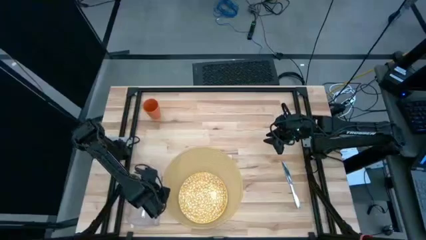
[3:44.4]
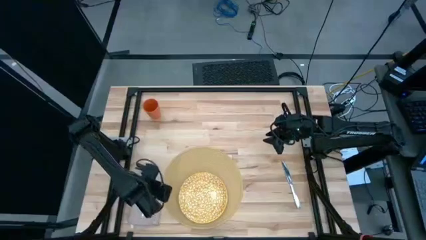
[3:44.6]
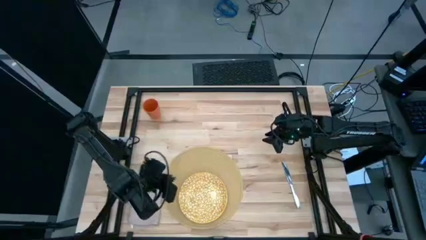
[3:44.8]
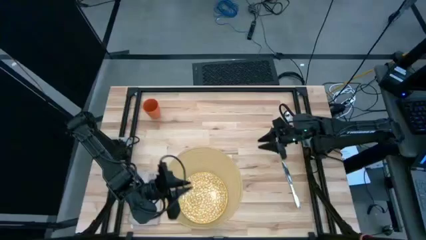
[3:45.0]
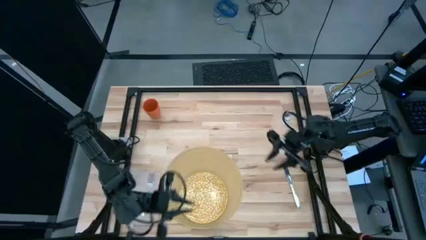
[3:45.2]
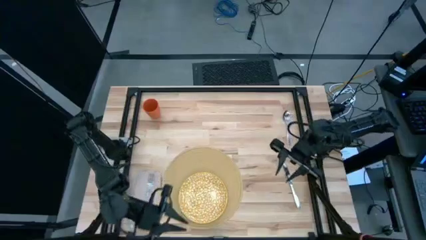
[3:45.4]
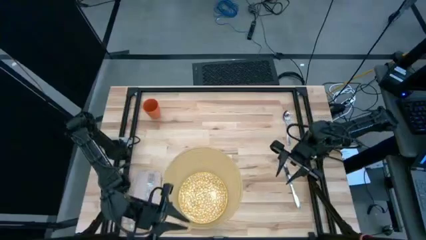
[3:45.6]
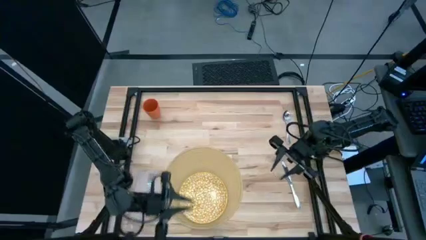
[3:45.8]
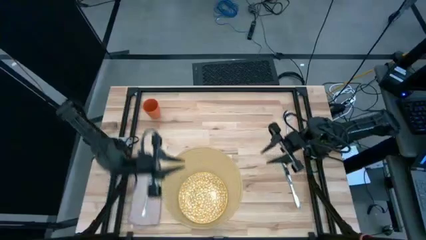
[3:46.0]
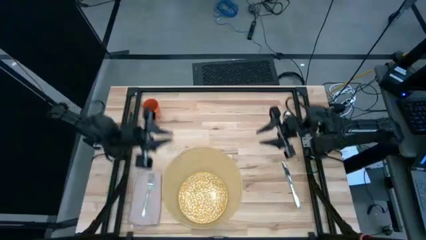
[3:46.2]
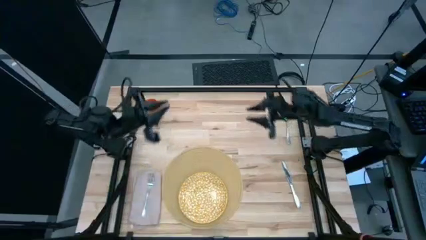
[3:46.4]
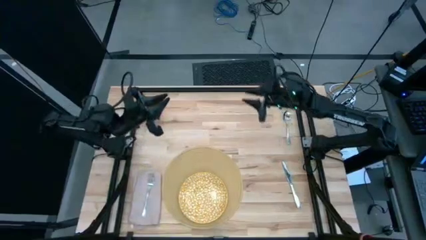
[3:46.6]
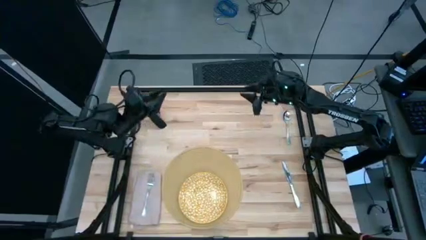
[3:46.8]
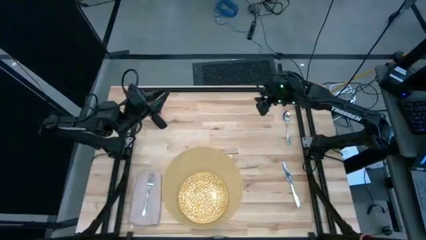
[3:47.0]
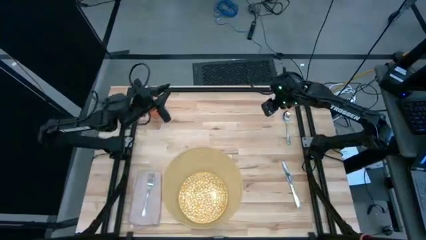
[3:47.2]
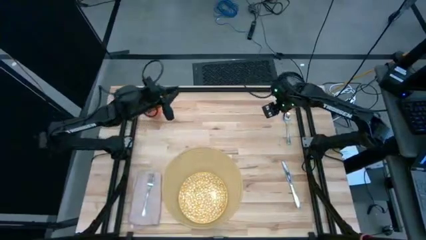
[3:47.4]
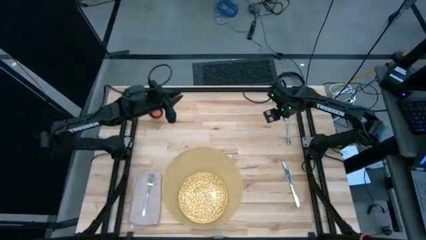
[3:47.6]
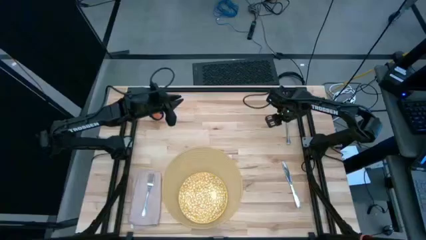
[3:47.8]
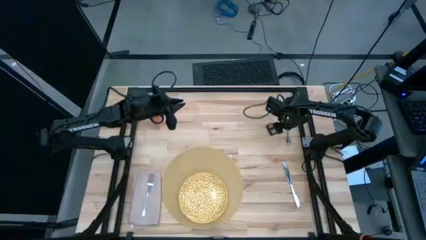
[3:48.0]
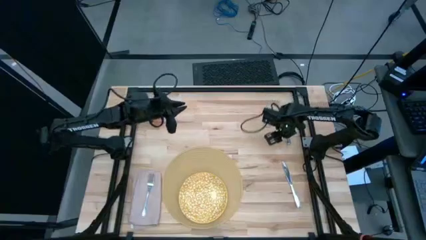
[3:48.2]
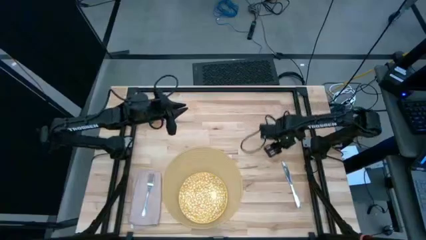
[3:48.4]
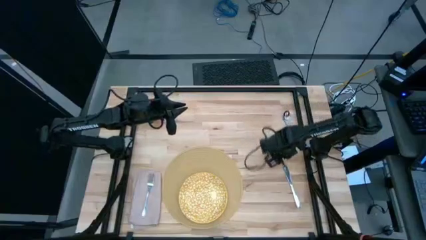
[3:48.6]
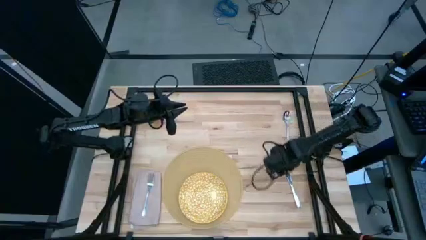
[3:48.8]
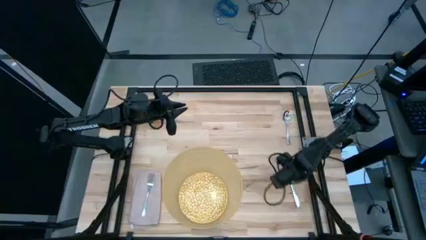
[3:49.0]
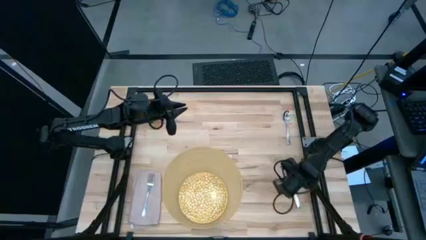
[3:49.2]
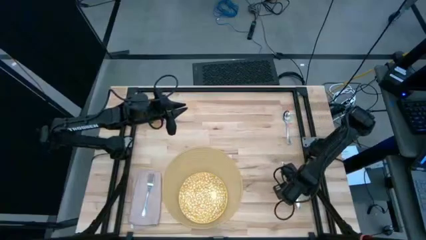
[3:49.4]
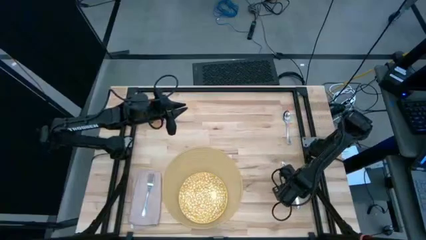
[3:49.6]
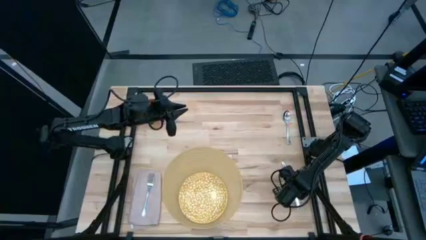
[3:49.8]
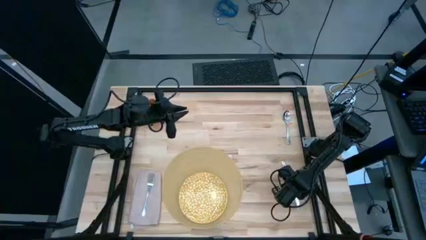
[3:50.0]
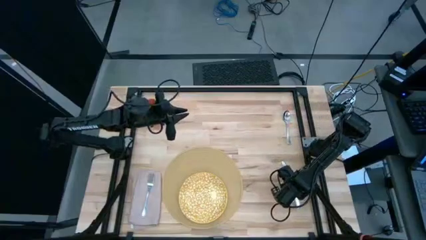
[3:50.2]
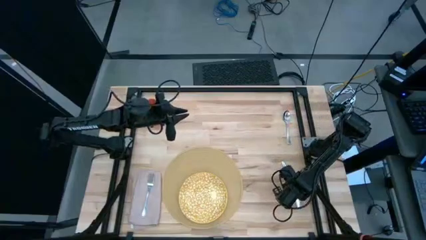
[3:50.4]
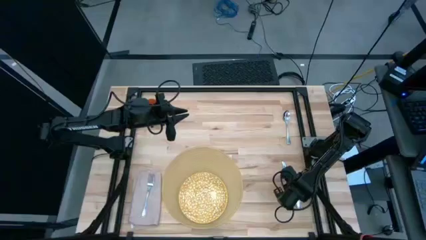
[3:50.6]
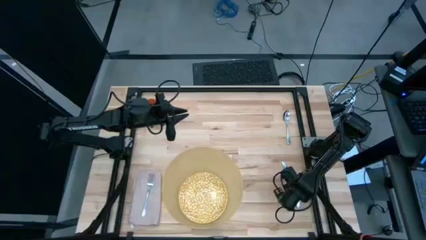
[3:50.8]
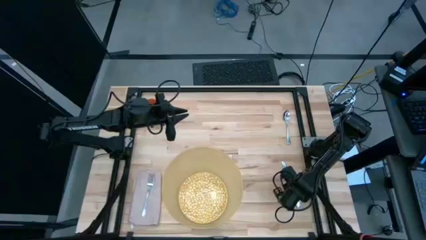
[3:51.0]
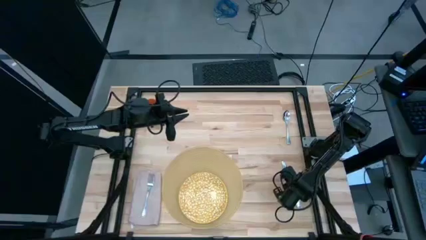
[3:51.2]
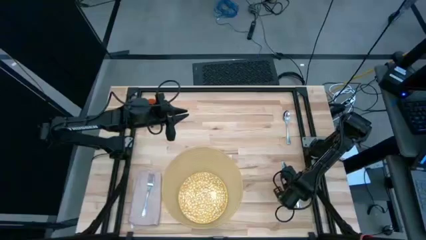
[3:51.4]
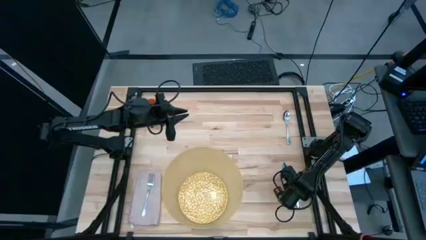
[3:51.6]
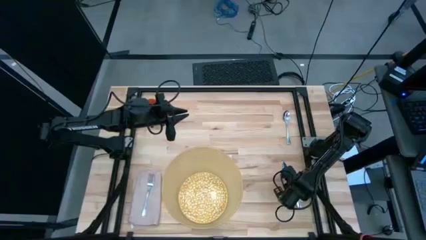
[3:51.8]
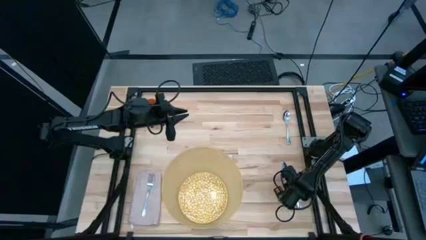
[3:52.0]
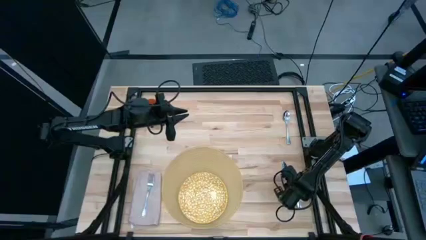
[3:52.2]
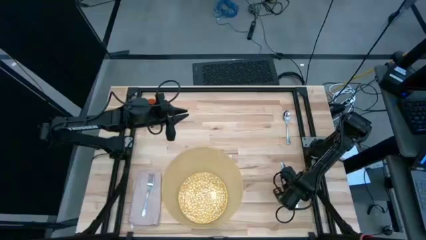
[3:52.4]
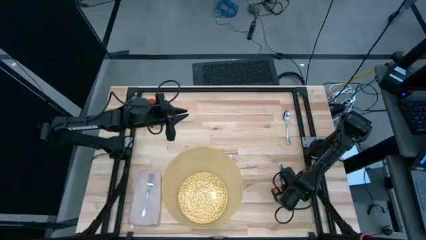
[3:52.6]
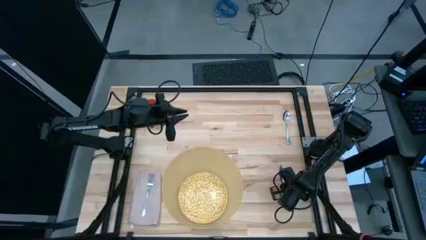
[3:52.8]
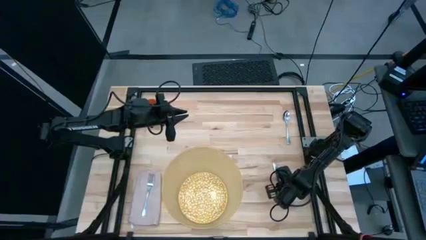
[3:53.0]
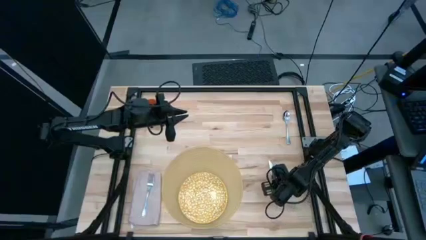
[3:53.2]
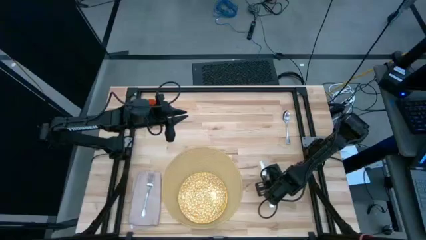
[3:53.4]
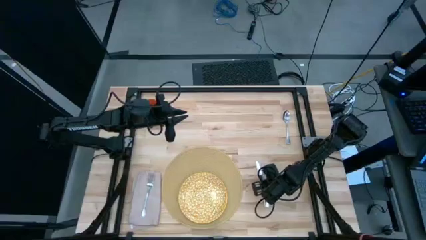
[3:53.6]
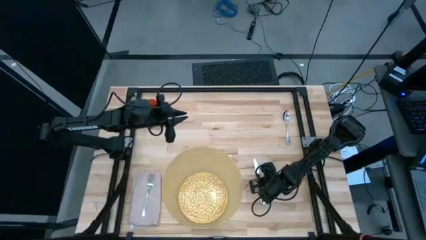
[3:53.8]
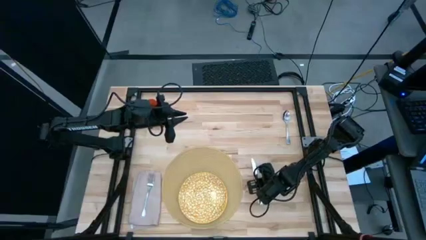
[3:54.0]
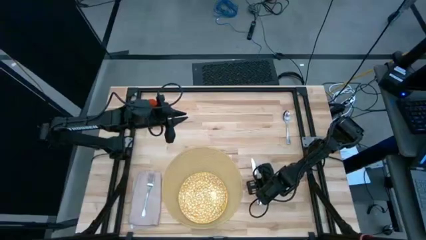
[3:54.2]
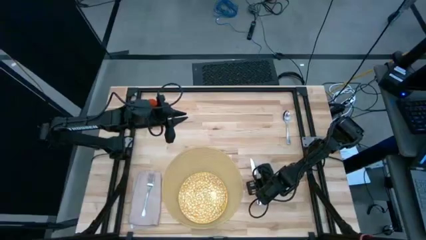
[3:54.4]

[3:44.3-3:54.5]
Task: Set table place
Put the silver knife to the right of the light brown mat

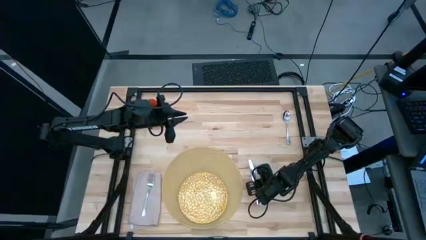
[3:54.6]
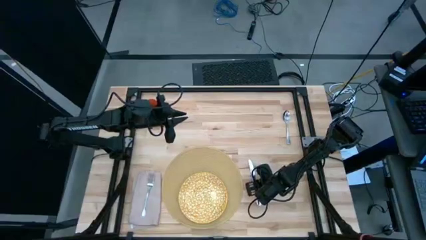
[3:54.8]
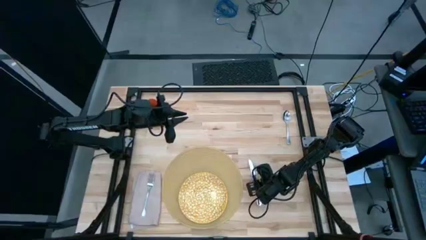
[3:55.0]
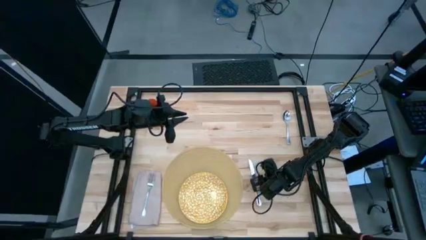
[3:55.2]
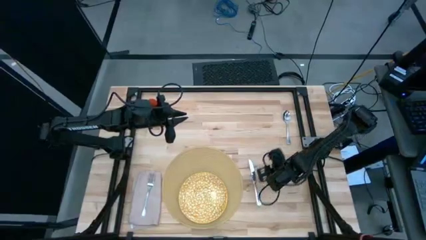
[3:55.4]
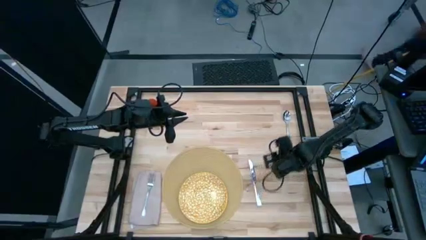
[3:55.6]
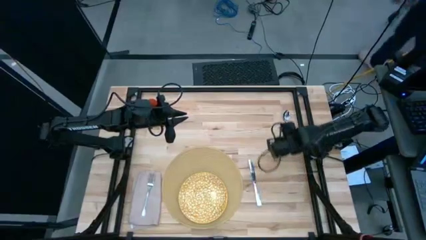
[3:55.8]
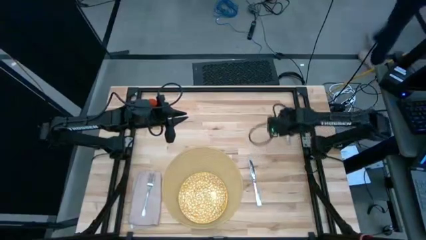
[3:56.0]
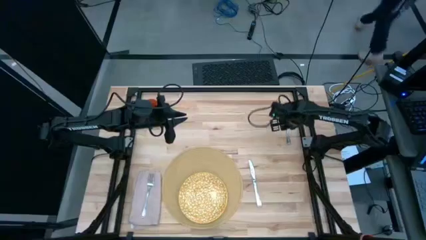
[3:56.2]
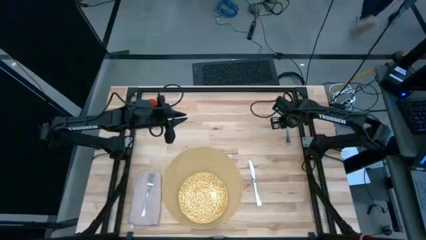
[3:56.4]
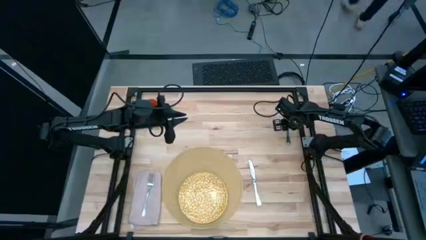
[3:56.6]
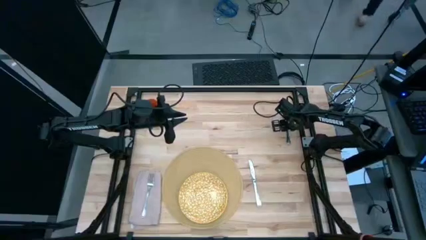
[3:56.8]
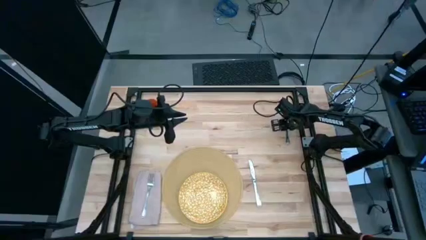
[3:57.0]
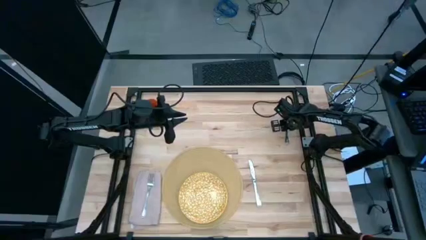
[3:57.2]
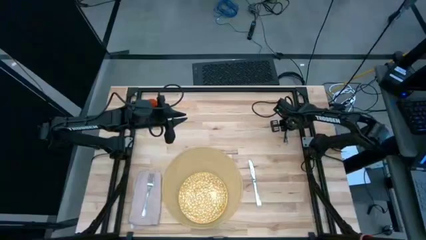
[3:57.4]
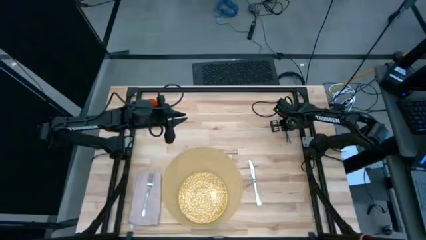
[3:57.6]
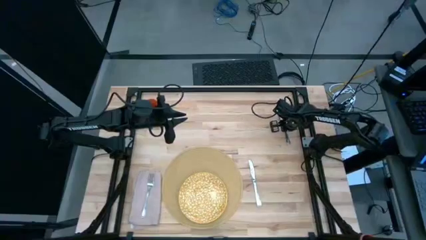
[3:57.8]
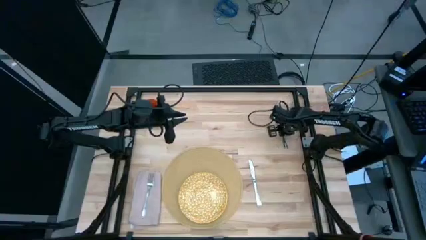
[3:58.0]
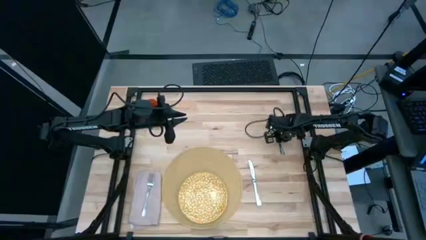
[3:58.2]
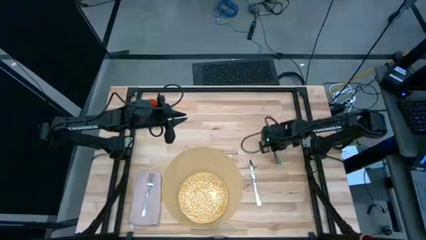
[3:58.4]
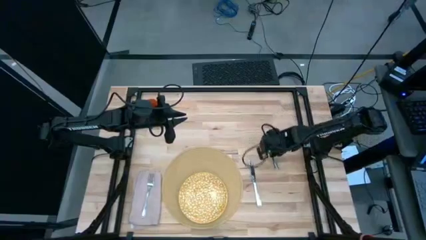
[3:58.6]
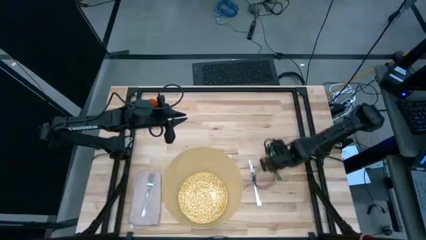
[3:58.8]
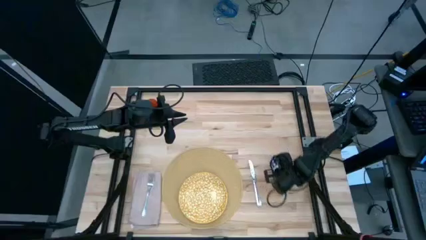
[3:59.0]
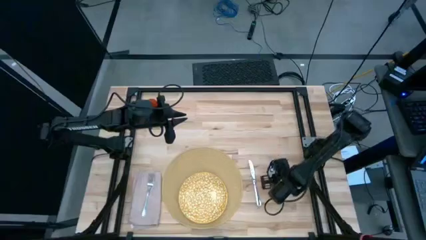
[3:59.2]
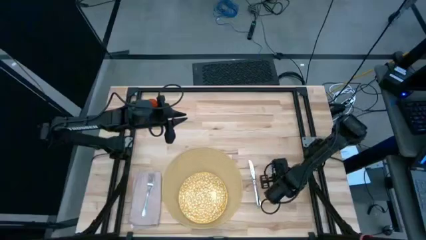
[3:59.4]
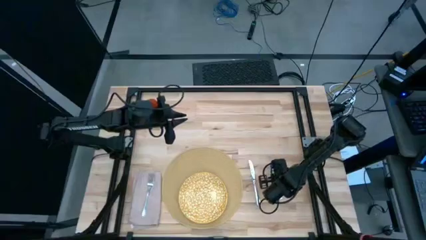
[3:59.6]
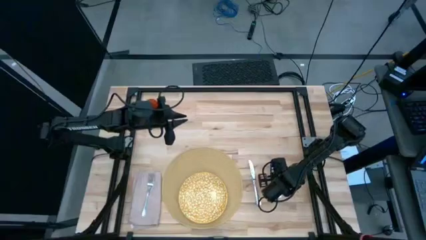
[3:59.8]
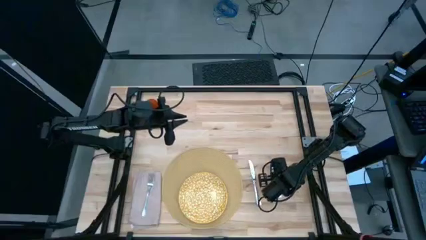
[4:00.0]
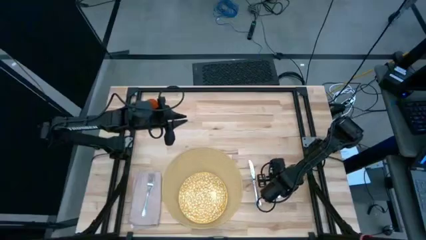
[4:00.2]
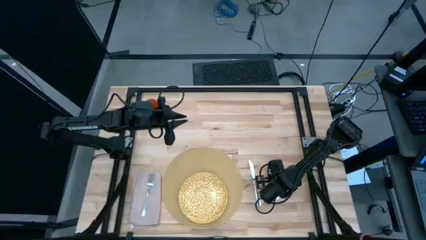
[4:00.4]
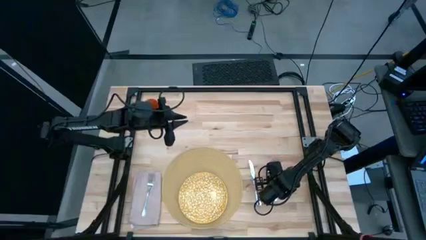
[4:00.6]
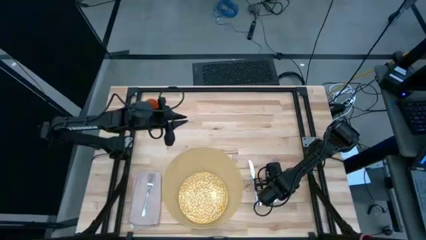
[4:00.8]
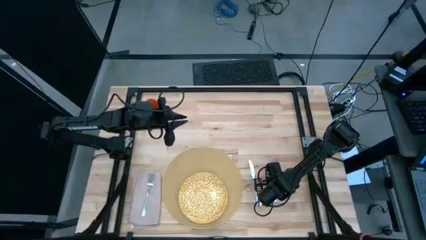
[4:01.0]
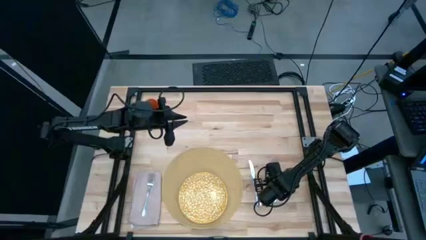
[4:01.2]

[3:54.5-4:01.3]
Put the spoon to the right of the silver knife
